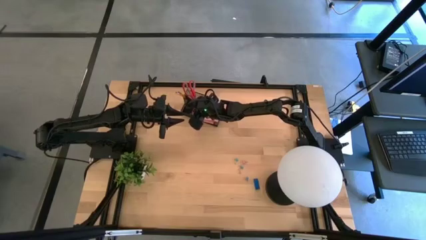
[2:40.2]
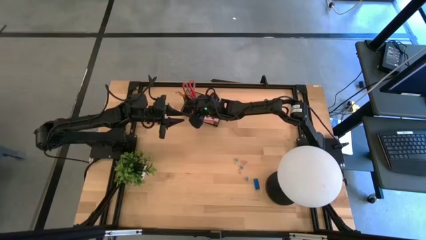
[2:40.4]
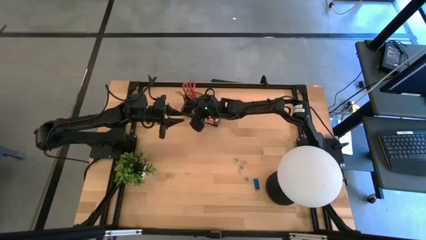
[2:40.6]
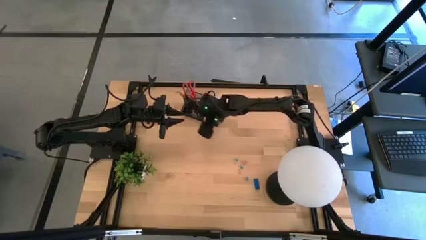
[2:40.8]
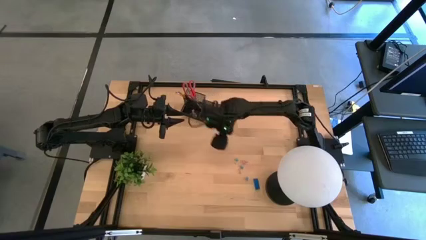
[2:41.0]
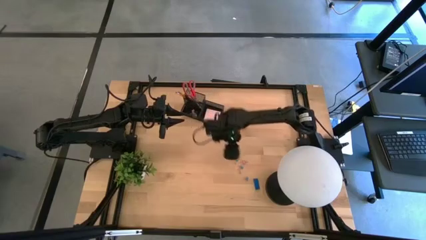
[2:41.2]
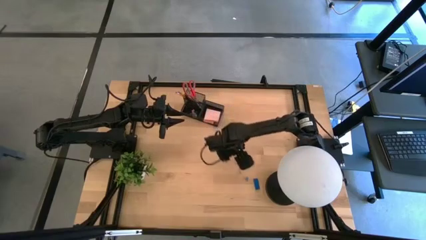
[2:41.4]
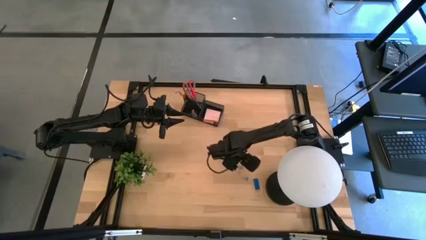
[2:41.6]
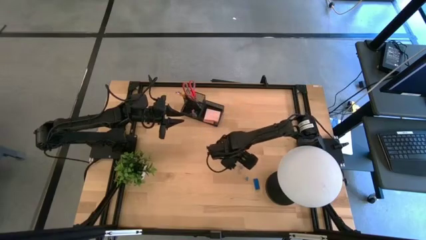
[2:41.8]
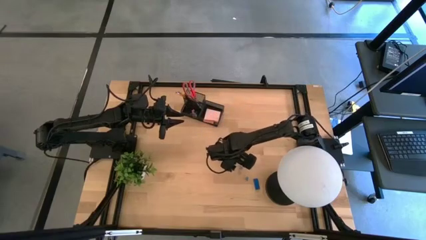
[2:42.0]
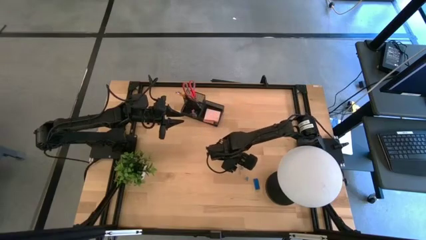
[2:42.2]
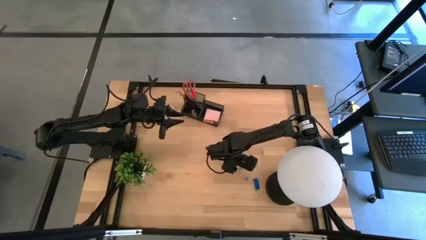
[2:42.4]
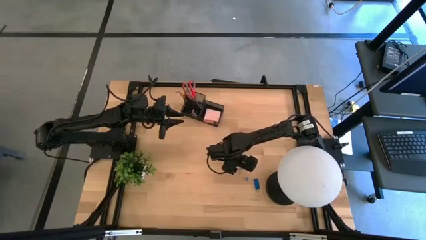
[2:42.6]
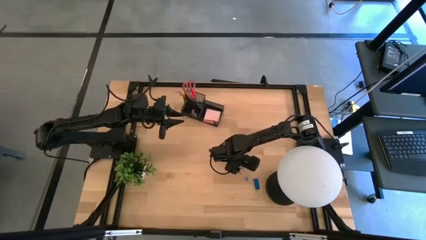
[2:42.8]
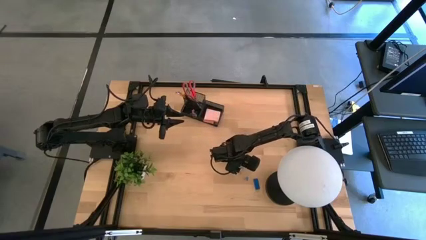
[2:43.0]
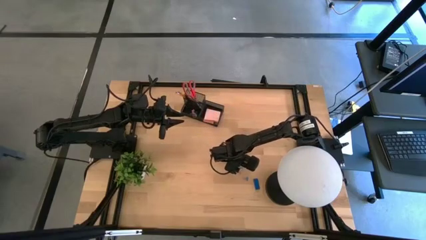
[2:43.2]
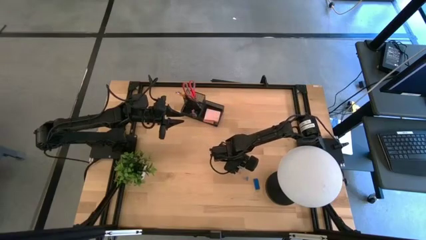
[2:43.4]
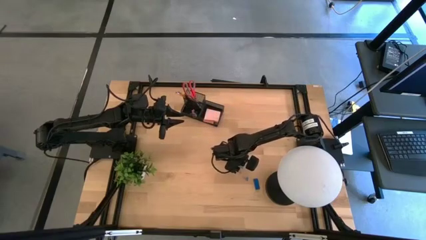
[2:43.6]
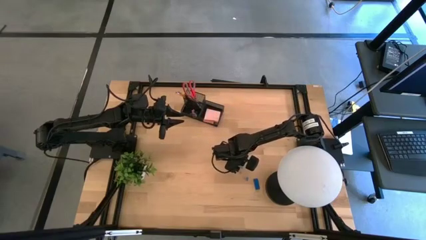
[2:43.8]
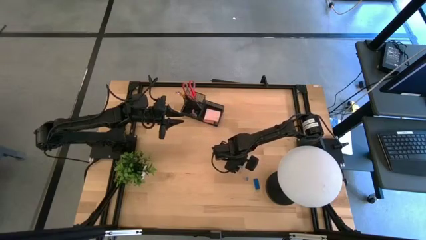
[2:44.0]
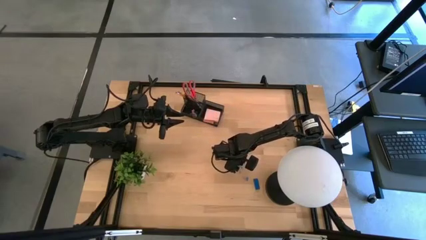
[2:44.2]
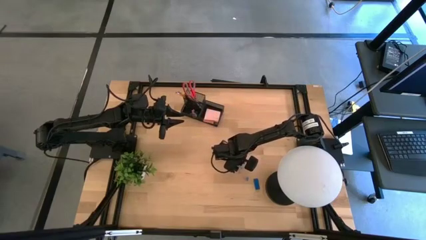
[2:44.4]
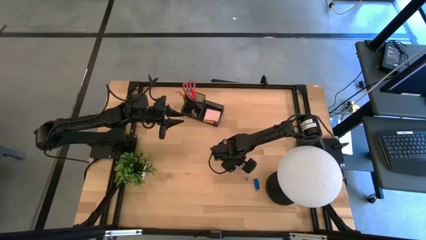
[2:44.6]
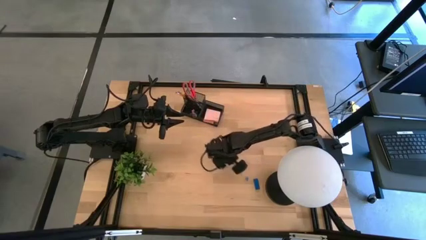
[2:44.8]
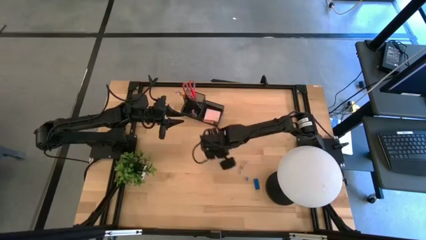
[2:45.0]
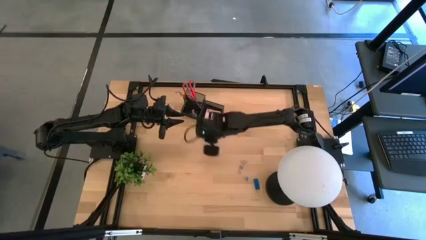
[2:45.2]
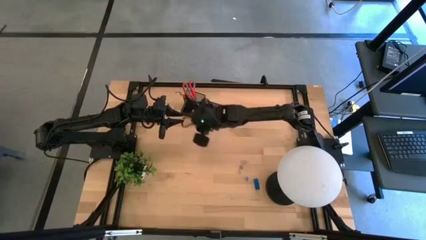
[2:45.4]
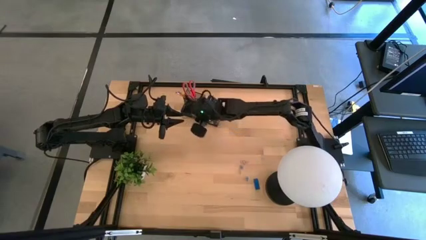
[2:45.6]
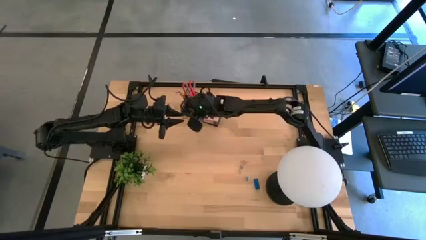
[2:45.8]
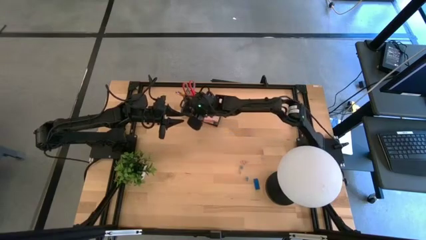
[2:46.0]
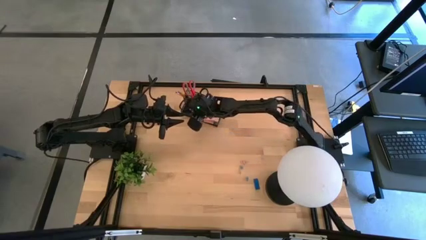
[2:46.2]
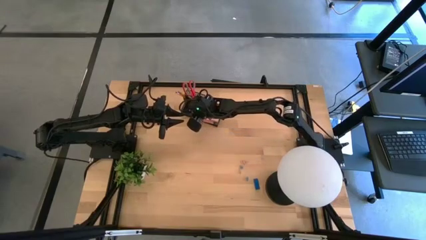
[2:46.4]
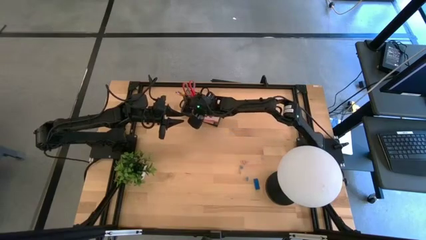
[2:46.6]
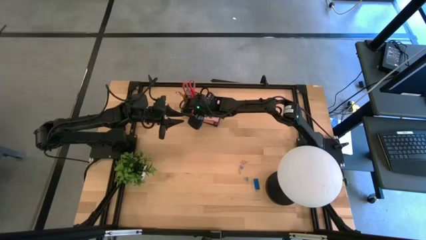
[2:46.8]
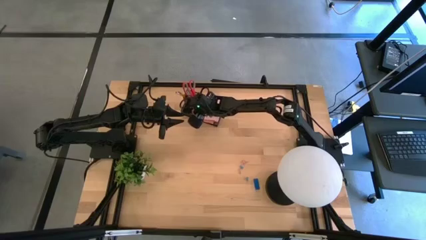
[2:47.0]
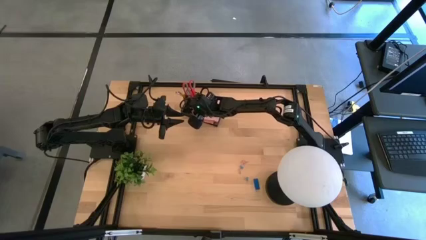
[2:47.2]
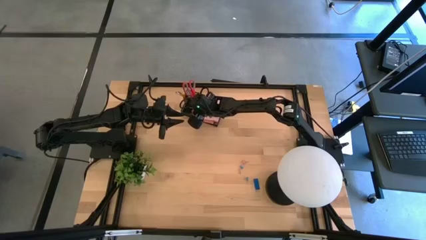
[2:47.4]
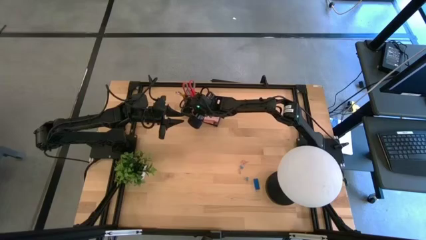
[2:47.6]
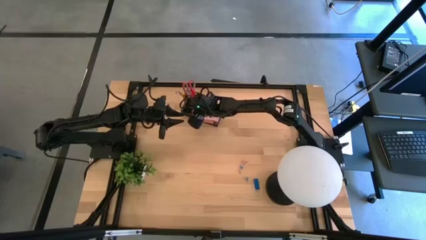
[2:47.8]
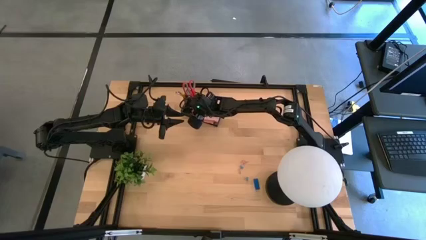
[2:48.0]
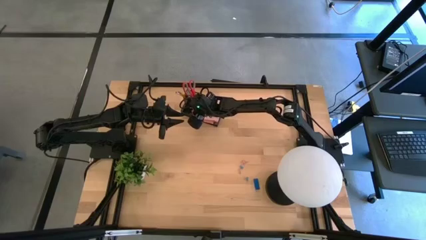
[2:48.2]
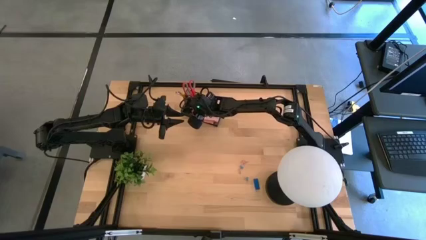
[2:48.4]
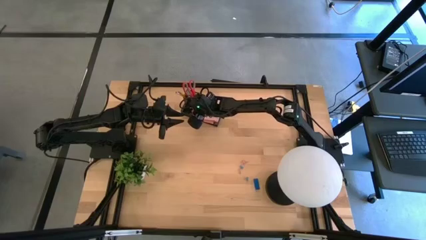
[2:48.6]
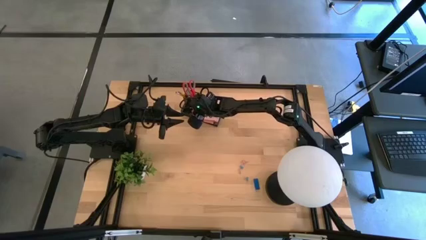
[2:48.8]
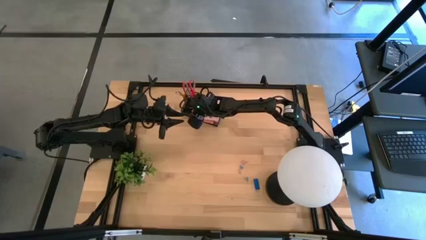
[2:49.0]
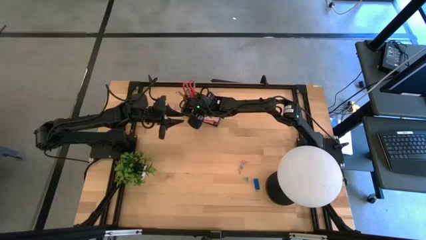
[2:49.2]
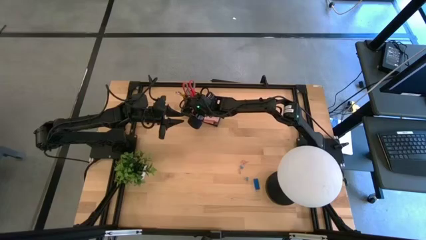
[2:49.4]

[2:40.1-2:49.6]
Task: Pick and place office supplies into organizer
Put the blue binder clip into the black desk organizer

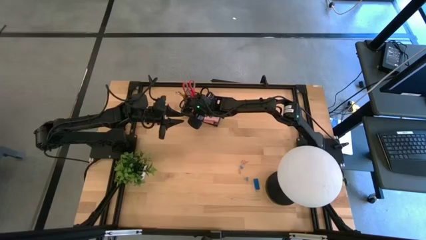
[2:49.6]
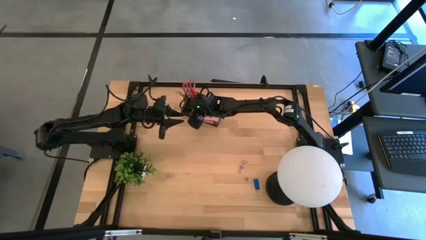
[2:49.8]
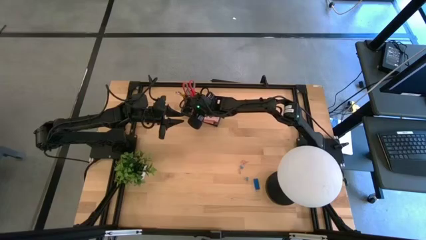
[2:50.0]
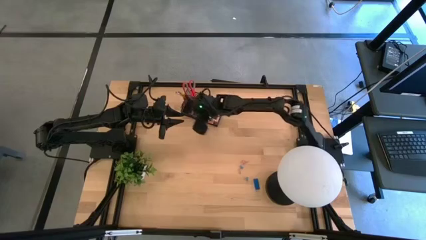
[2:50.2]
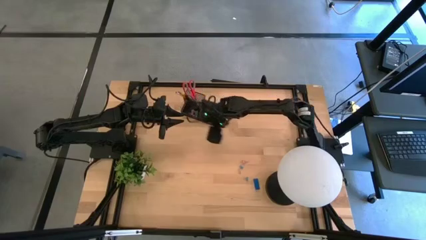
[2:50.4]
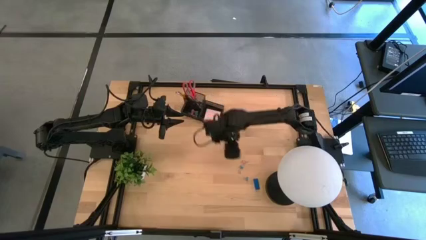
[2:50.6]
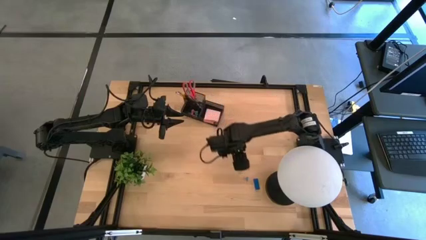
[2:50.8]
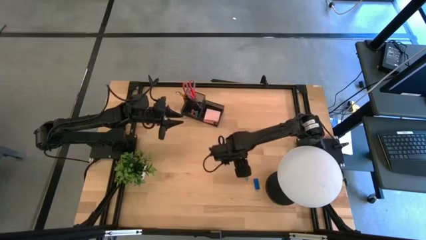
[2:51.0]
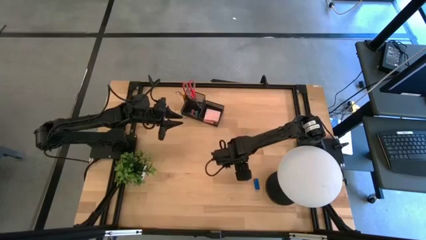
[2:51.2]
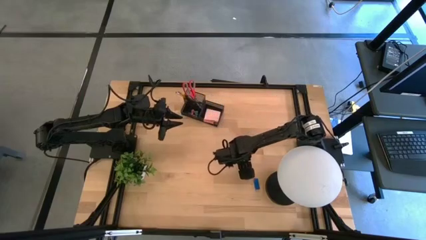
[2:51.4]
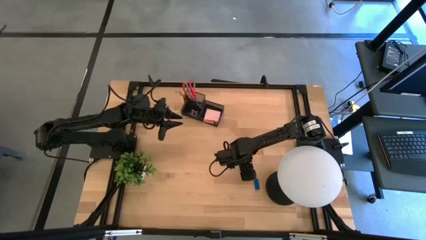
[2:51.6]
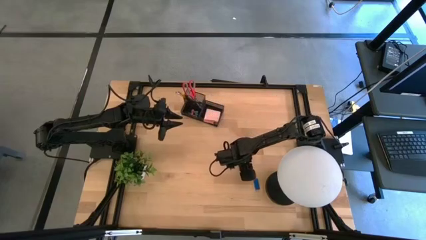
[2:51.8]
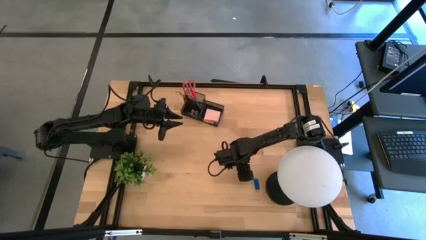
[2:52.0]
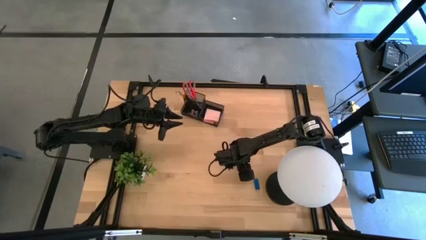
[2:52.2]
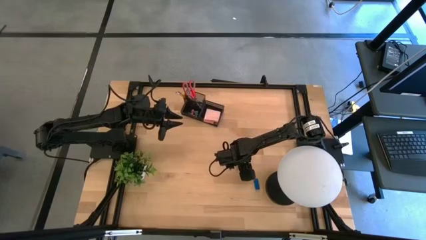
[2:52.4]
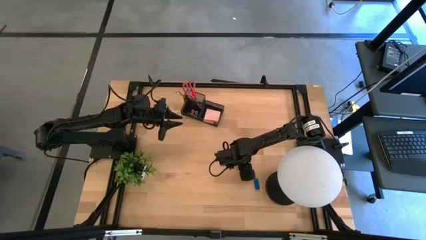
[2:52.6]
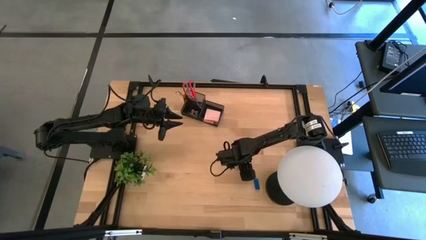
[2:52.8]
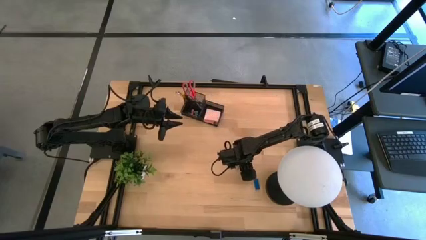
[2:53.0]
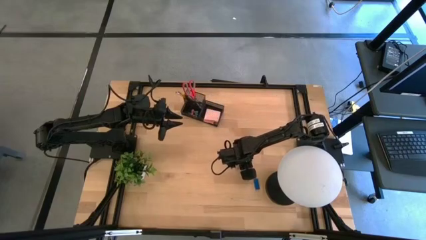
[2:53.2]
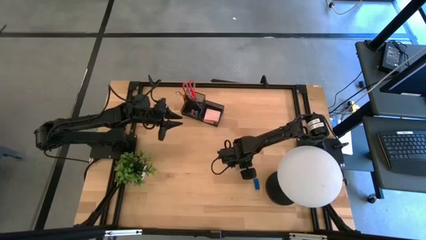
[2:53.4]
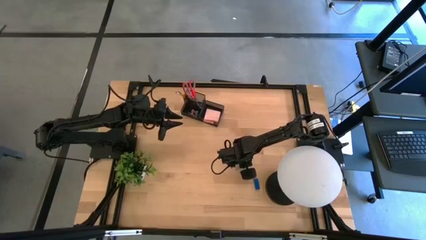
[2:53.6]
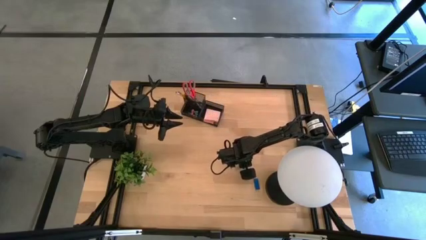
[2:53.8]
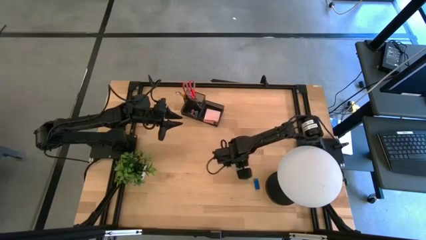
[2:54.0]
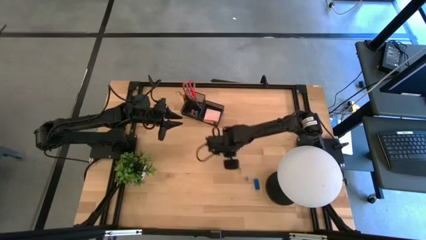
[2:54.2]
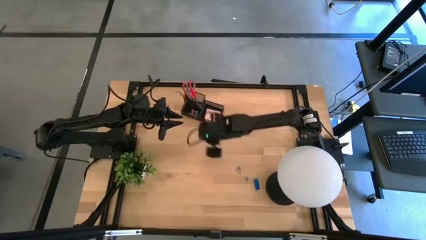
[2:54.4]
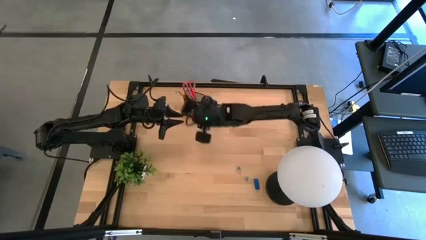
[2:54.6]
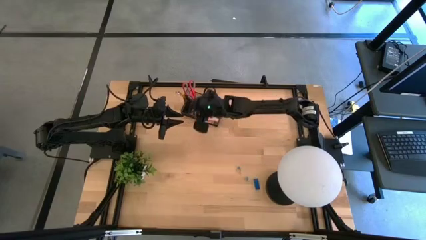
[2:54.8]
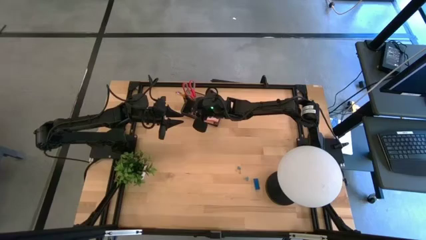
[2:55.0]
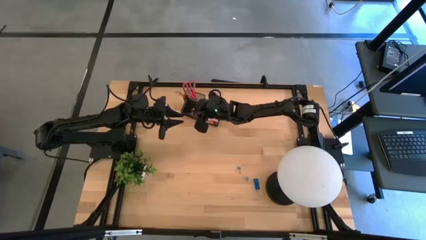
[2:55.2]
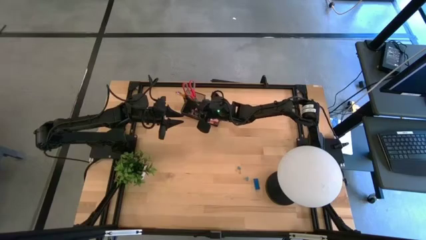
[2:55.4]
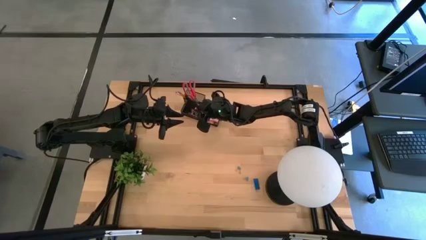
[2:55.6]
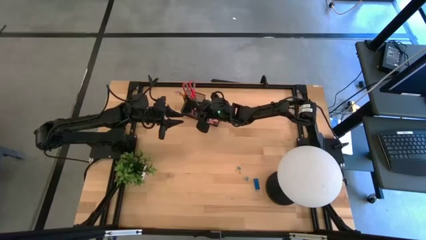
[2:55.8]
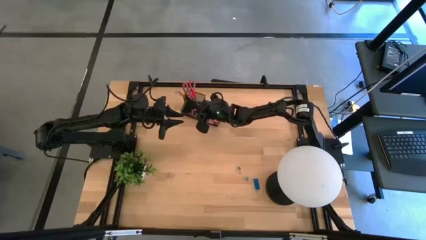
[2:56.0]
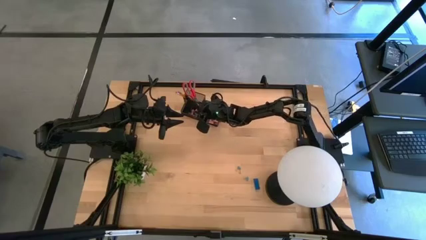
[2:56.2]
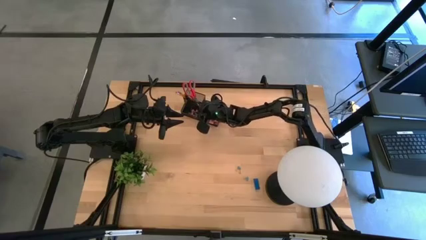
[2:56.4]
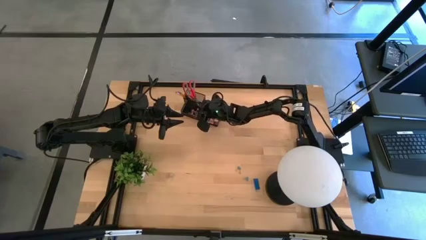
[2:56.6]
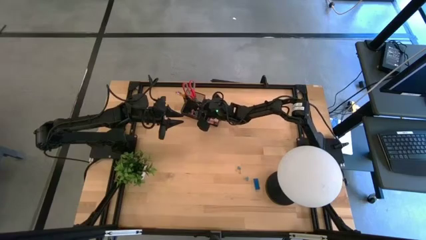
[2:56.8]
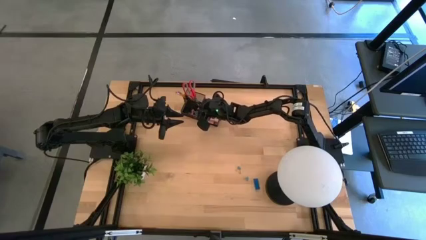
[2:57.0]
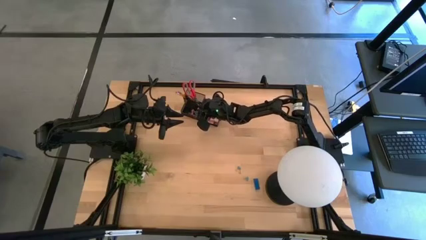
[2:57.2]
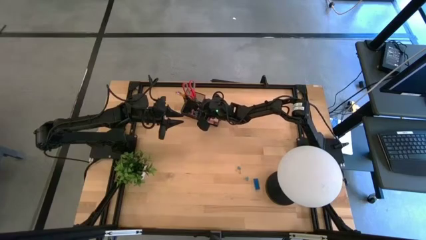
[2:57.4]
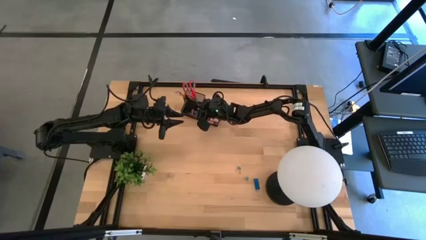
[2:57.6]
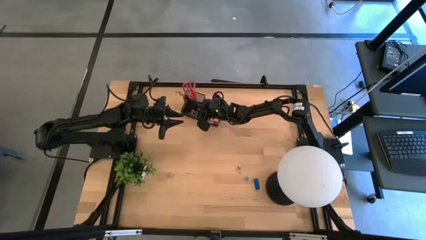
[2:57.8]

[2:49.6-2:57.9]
Put the pink binder clip into the black desk organizer
